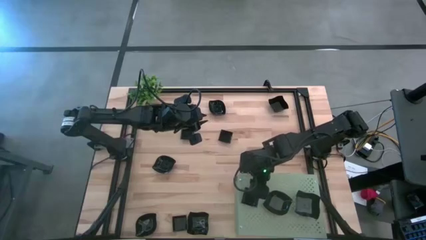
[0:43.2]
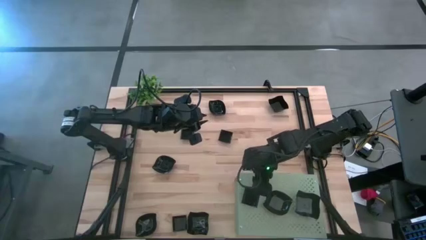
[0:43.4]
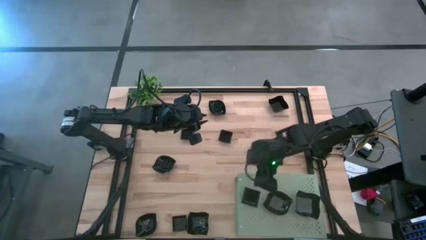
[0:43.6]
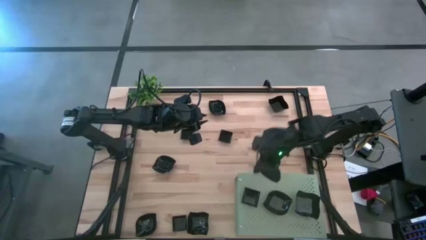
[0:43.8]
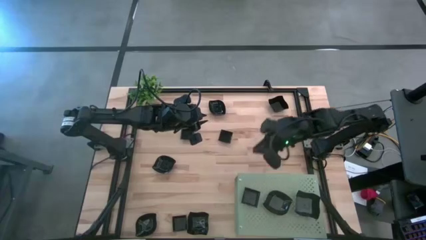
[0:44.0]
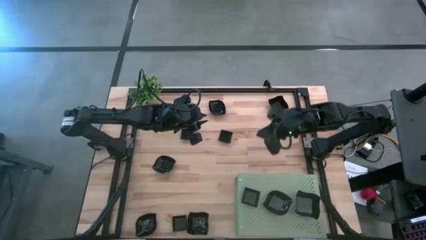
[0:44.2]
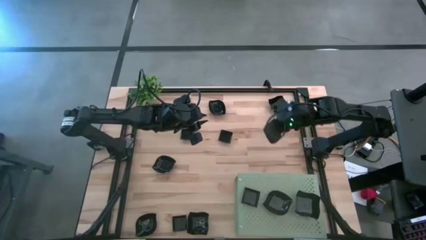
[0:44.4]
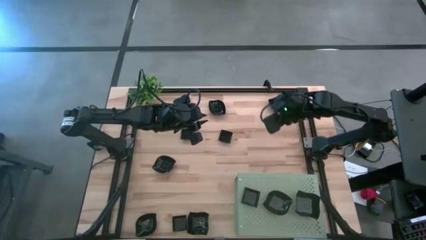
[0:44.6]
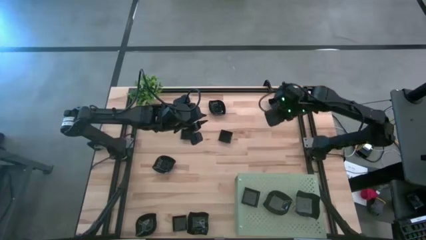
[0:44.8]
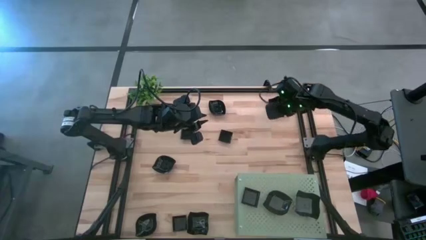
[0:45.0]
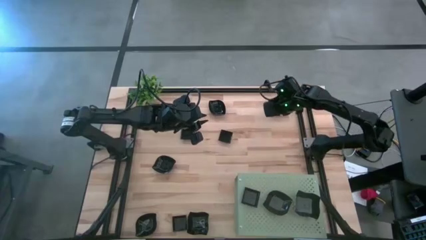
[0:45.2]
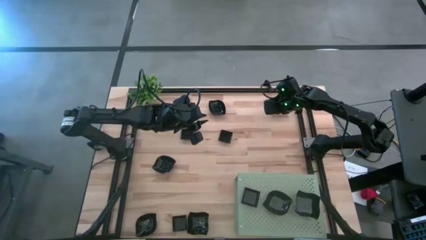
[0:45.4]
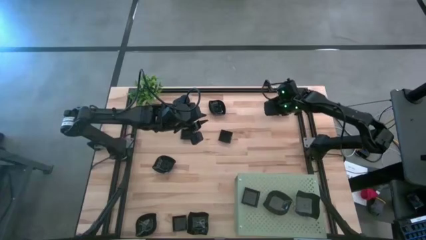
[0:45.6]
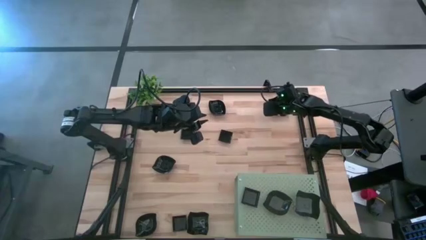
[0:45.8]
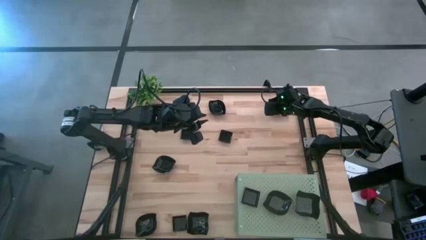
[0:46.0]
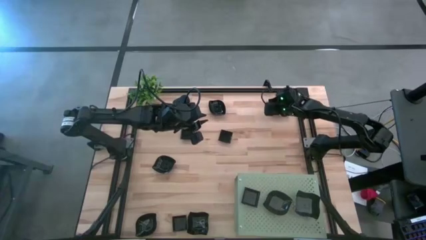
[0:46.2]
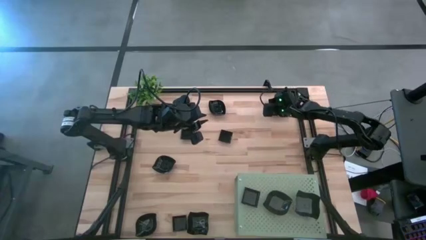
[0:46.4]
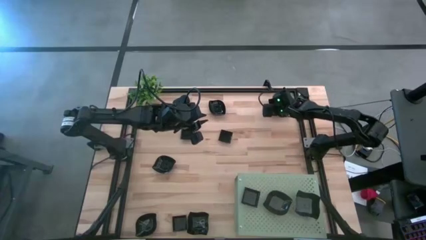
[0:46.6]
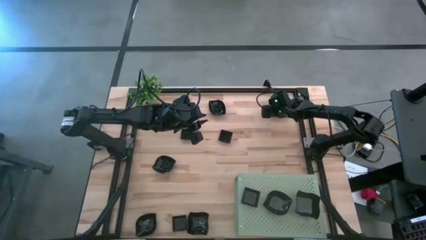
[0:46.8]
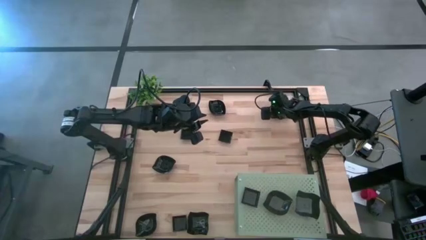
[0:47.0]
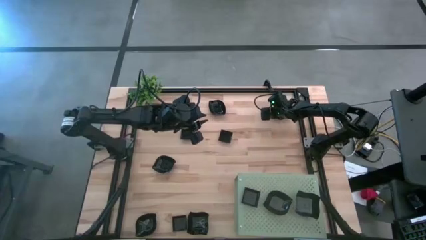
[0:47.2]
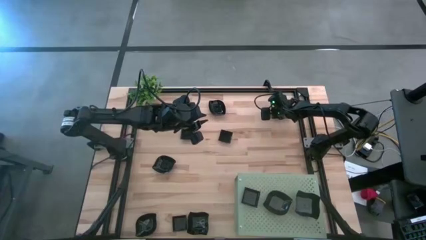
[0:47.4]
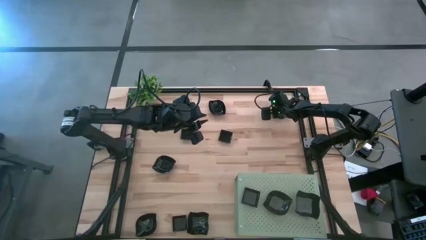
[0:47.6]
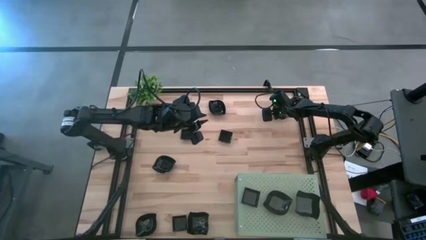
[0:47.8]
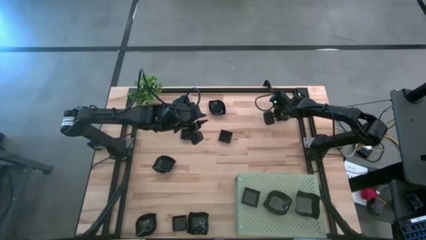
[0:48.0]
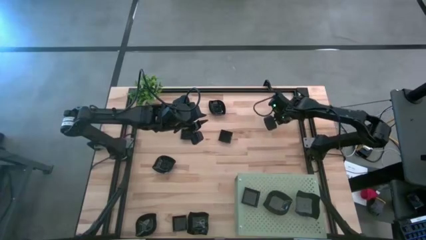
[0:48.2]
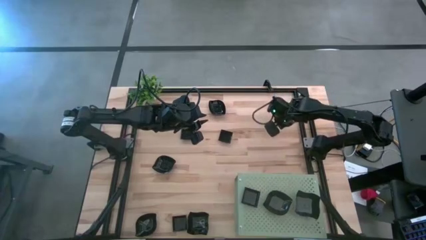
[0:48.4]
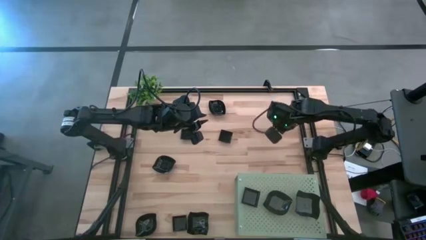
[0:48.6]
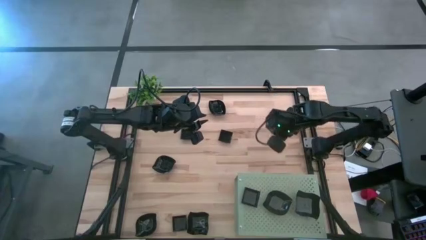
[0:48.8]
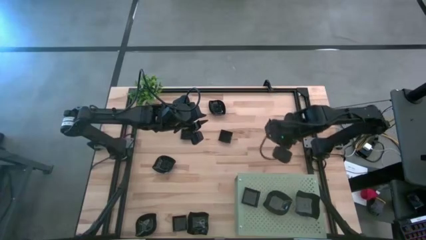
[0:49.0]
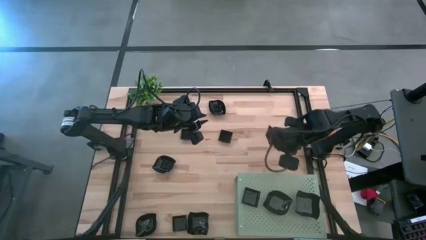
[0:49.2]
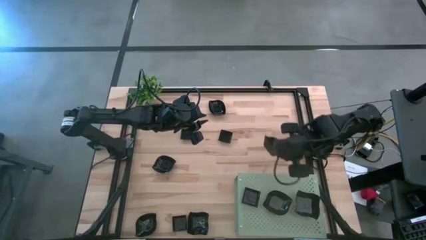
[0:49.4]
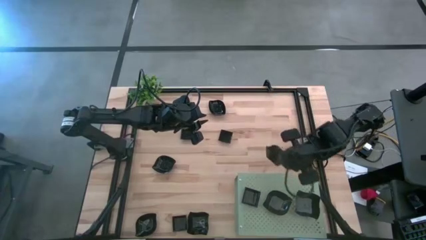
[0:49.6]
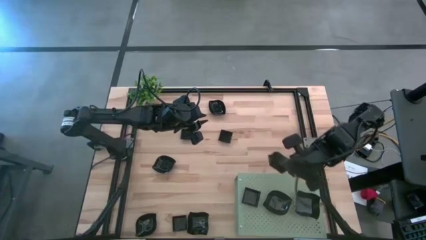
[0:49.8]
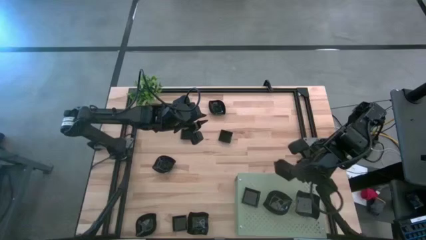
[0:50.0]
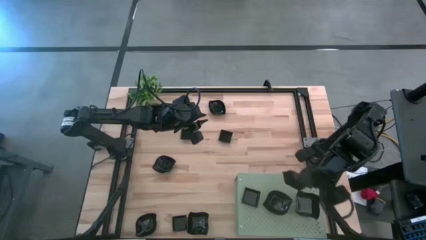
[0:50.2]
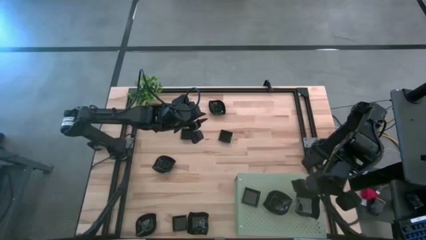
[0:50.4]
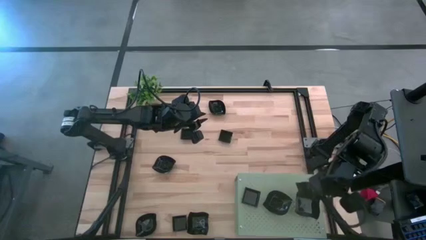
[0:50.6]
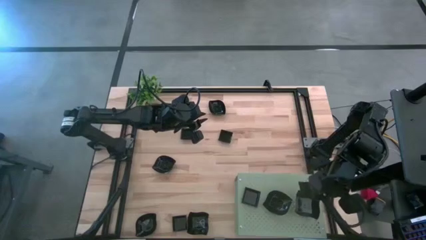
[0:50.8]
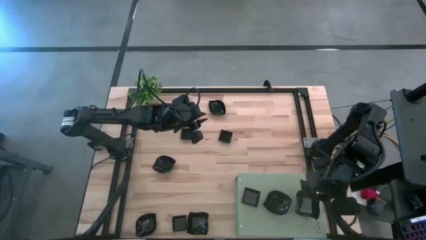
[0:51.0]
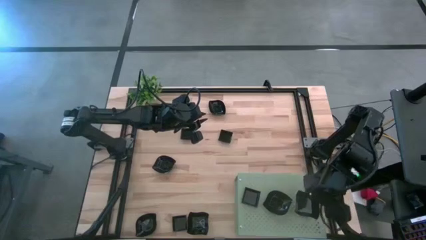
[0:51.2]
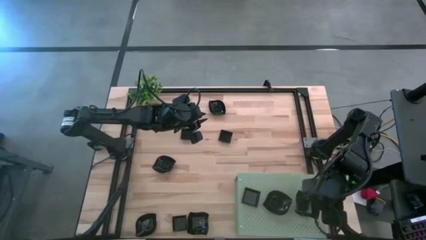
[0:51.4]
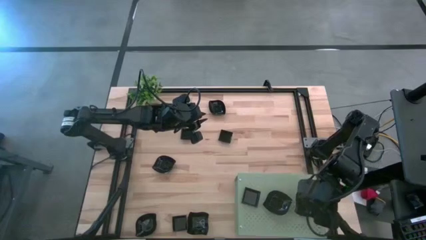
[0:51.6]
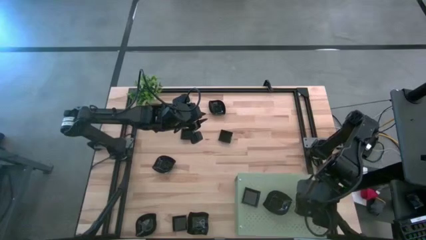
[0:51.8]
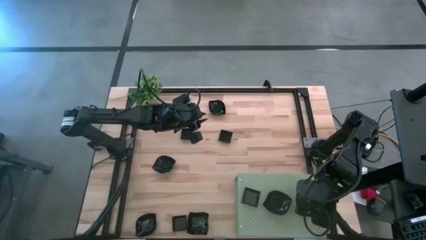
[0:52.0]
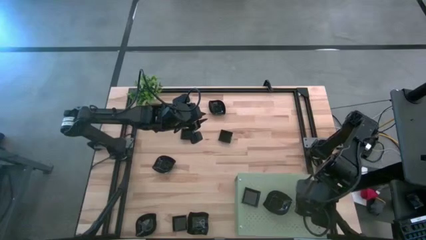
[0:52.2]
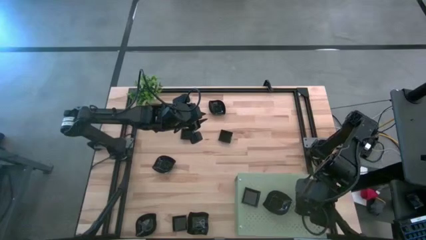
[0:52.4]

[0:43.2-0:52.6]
Task: Pick & Place Mini shaped plates
Stack the distorted square plate on the distorted square plate on the shelf

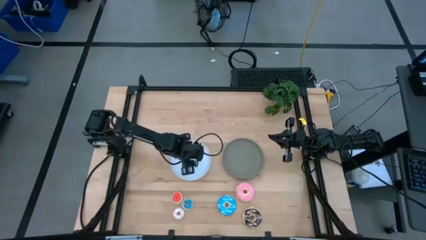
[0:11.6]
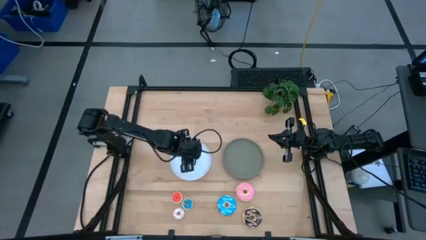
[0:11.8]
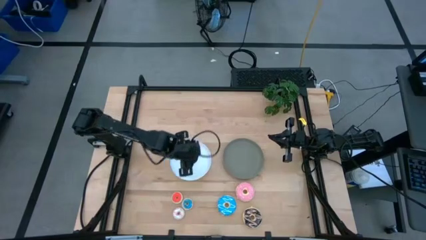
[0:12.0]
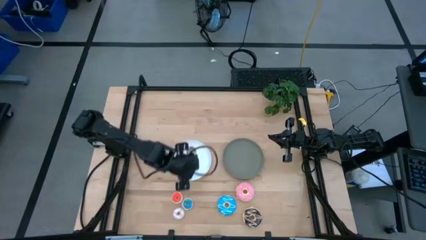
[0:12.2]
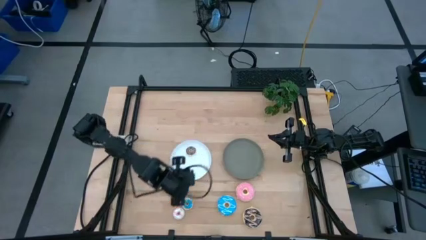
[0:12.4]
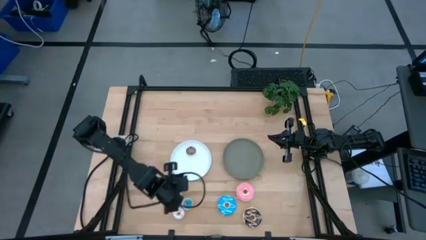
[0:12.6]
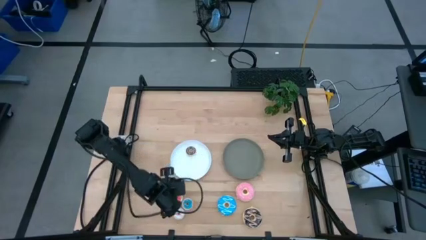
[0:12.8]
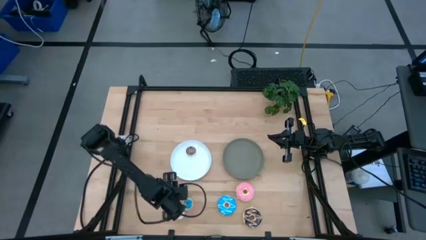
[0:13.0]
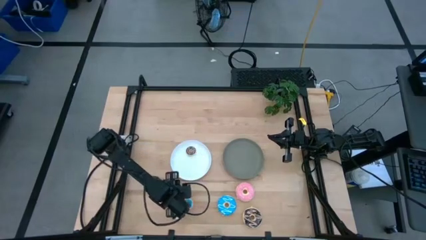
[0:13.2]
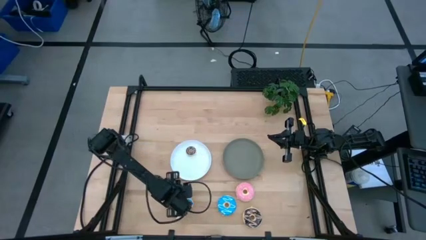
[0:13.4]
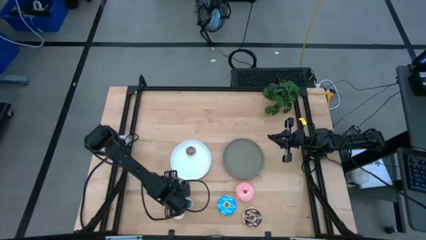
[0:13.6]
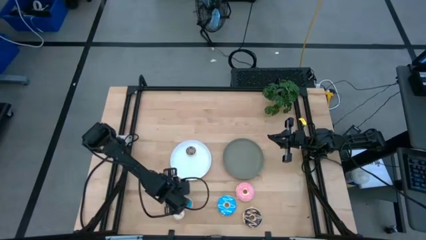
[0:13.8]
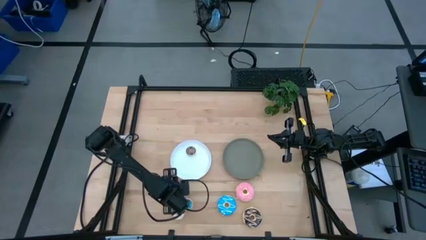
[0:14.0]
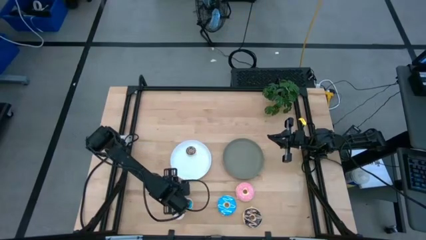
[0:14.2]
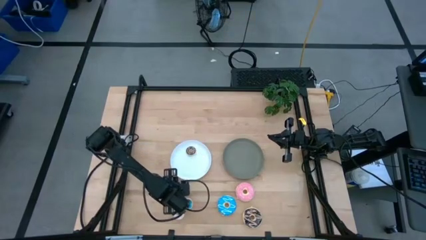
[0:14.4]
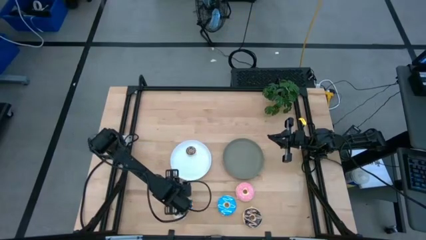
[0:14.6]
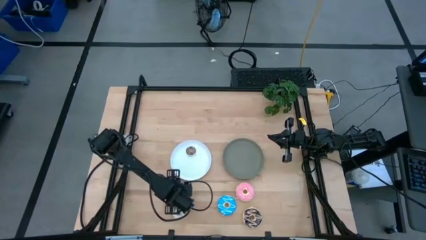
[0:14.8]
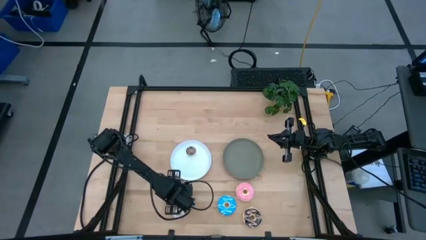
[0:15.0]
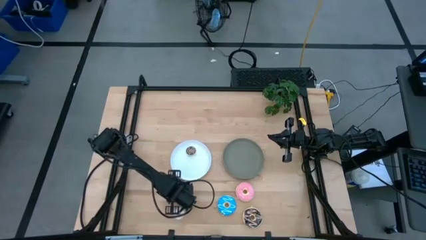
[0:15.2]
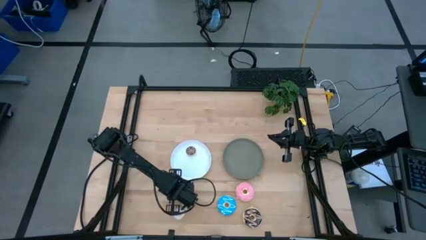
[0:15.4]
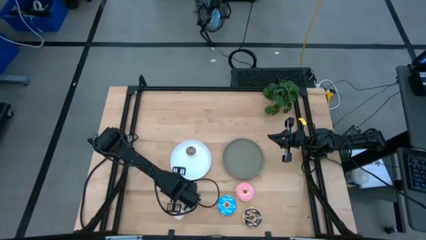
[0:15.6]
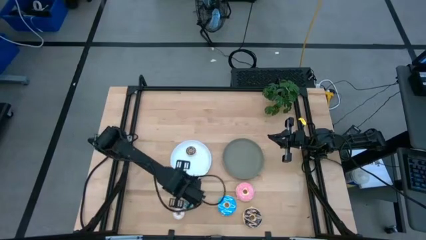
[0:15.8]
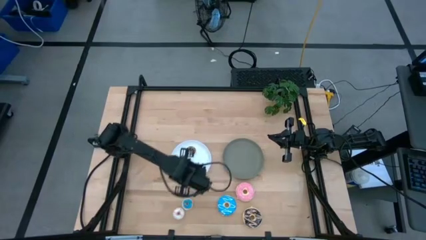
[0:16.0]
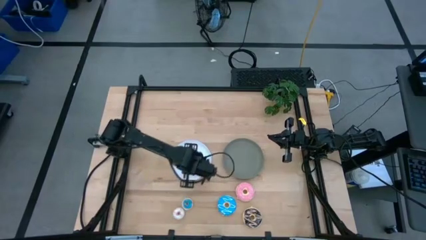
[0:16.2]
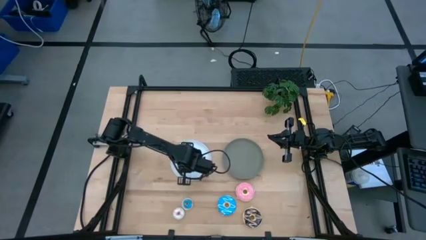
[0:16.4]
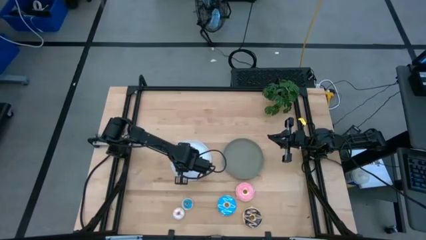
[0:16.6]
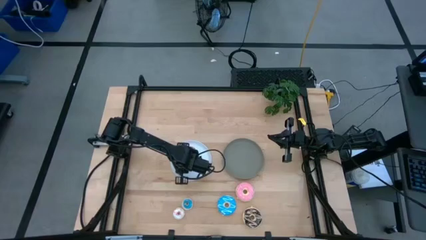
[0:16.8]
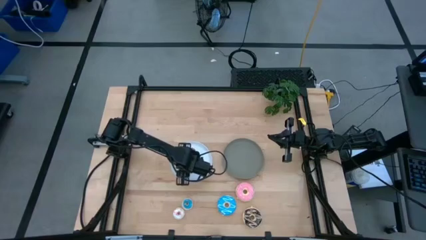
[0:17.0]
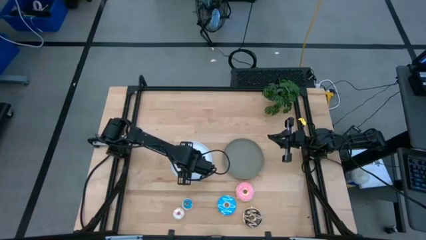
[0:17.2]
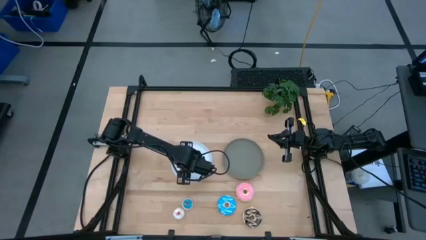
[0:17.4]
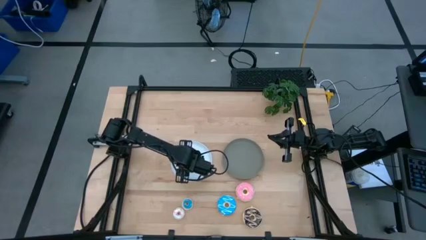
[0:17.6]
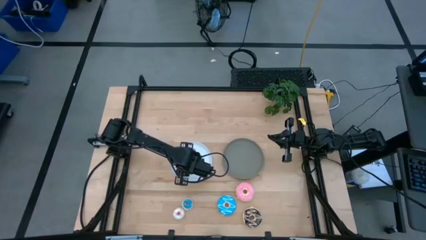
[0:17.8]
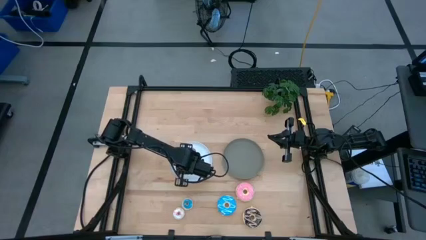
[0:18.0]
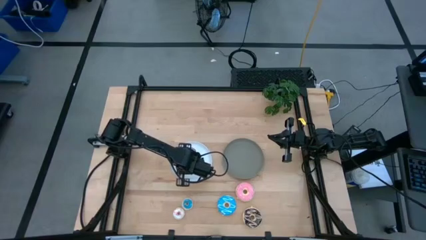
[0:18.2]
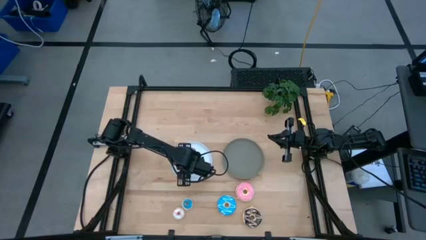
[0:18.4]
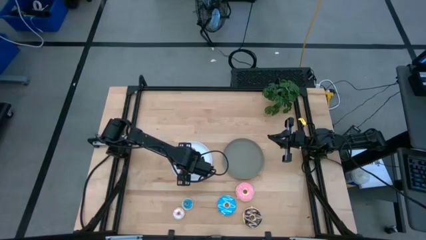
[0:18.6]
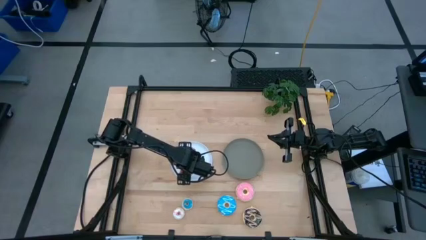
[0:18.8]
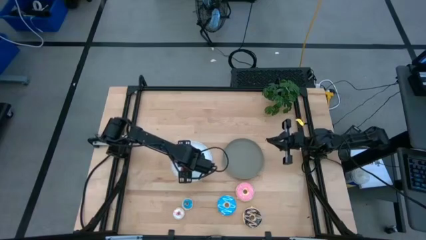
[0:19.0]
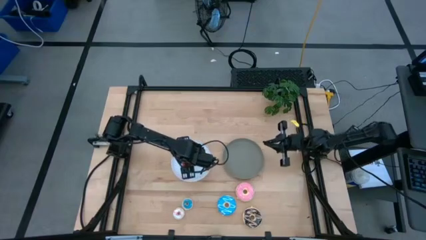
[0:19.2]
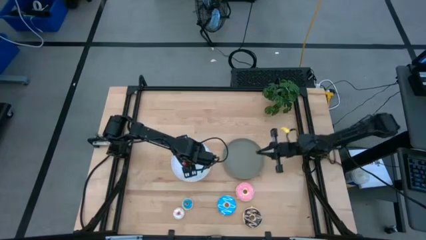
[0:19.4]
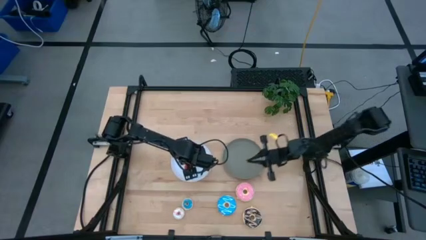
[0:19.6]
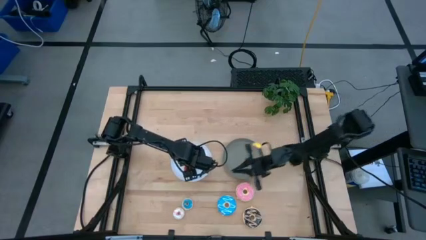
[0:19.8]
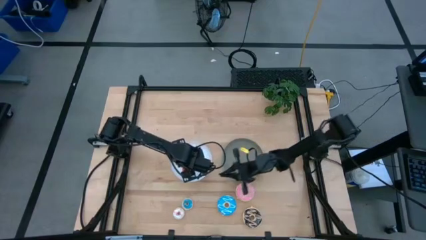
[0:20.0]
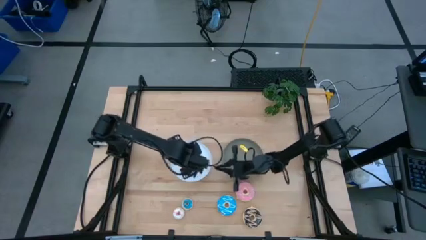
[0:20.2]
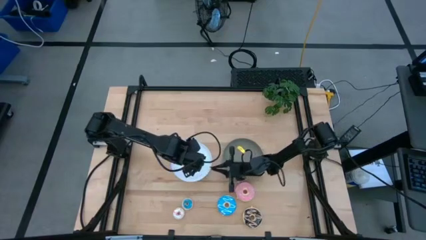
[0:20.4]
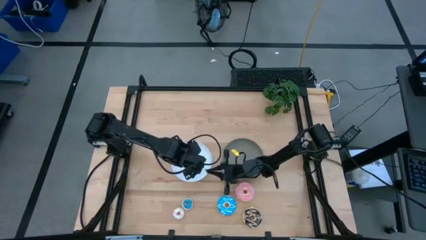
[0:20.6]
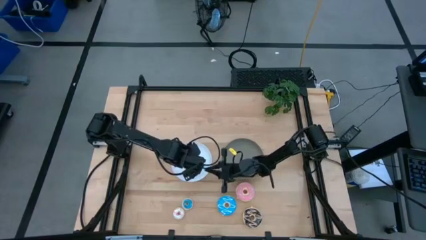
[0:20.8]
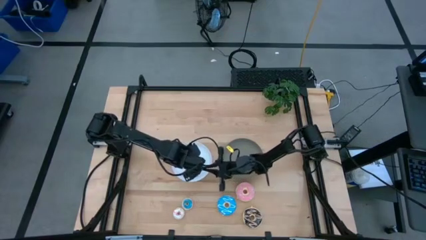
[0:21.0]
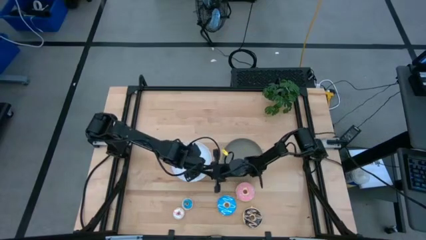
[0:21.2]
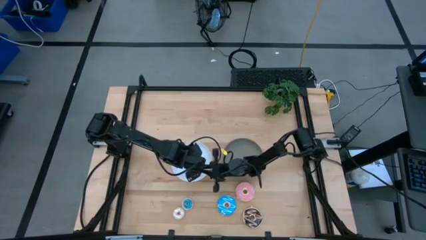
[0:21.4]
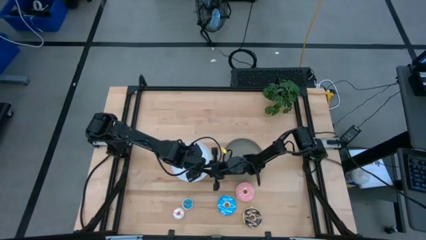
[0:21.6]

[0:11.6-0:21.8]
Task: Pick & Place donuts
Put the small pink donut on the white plate
